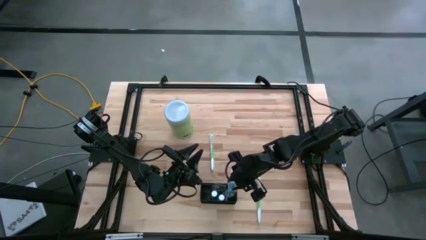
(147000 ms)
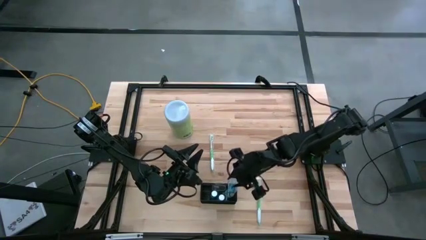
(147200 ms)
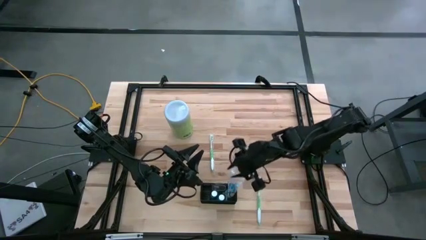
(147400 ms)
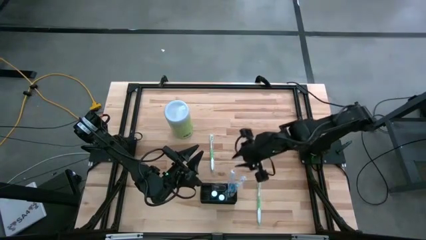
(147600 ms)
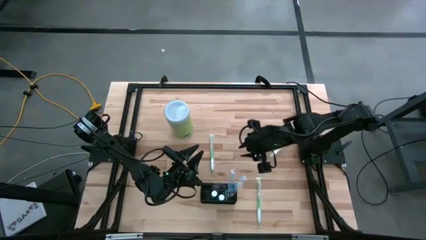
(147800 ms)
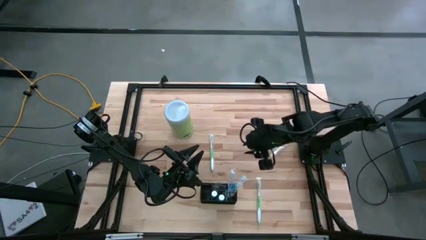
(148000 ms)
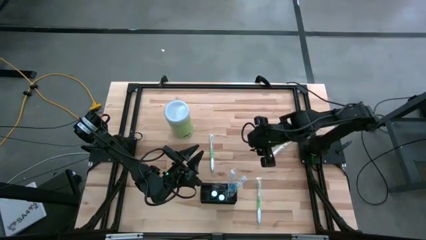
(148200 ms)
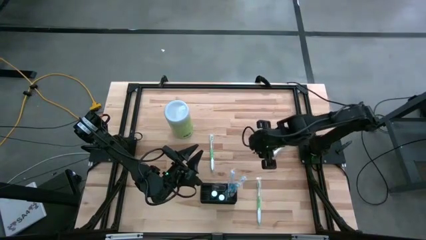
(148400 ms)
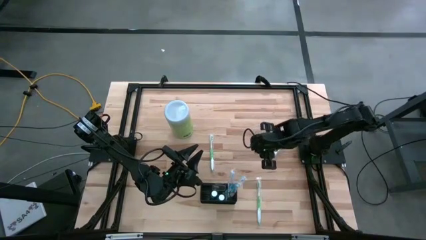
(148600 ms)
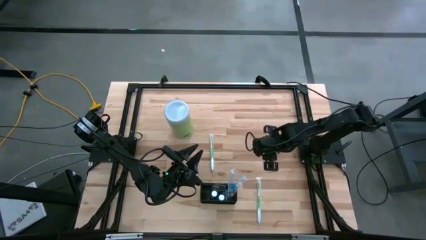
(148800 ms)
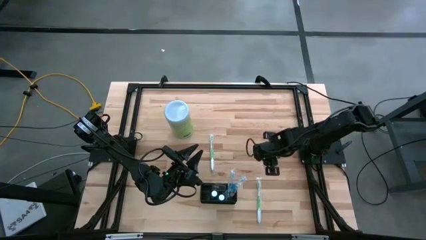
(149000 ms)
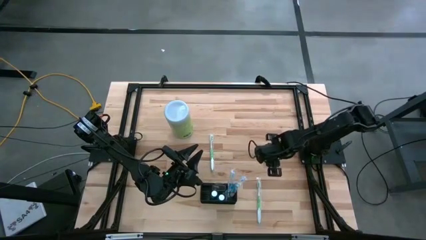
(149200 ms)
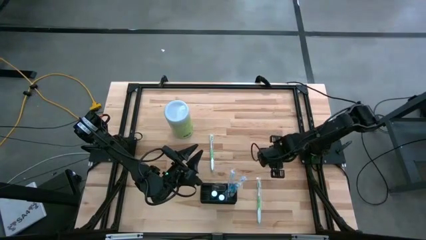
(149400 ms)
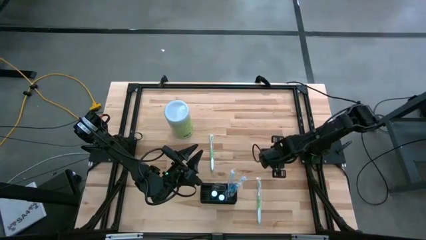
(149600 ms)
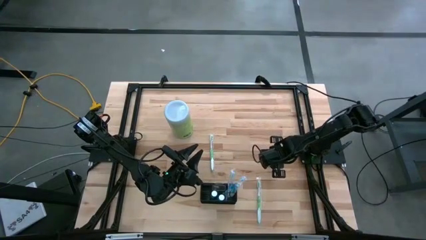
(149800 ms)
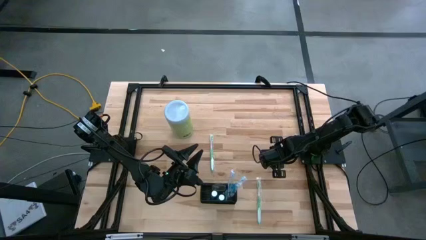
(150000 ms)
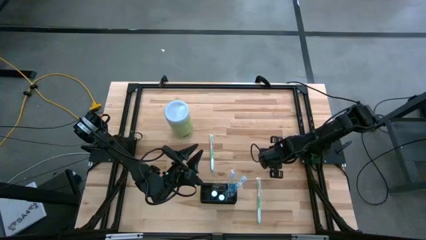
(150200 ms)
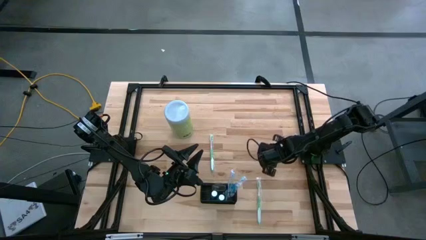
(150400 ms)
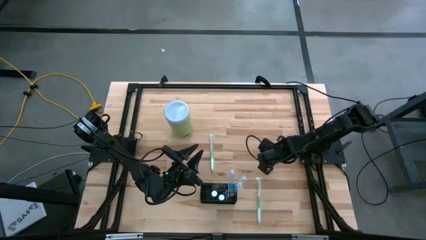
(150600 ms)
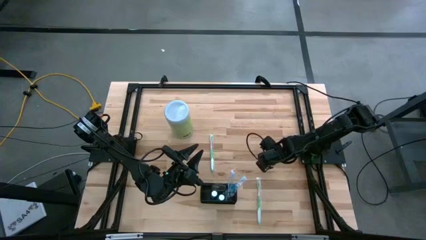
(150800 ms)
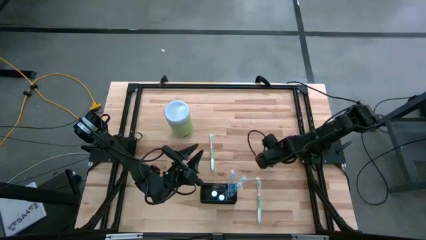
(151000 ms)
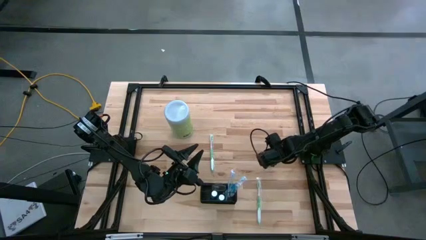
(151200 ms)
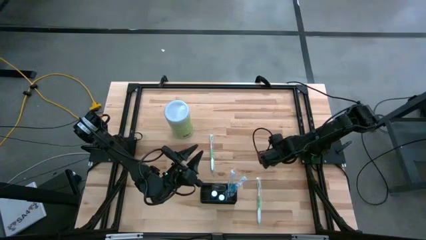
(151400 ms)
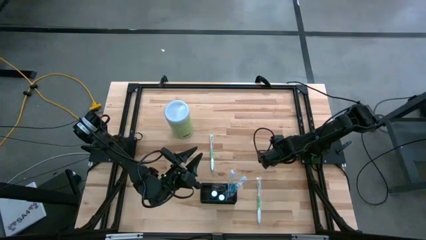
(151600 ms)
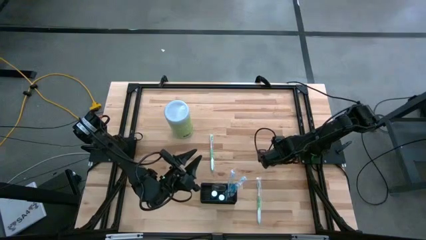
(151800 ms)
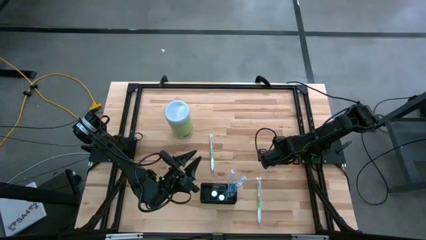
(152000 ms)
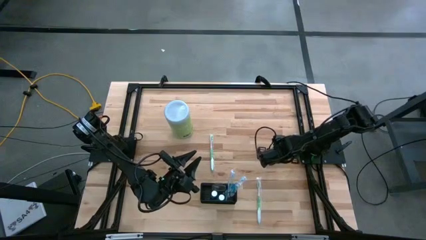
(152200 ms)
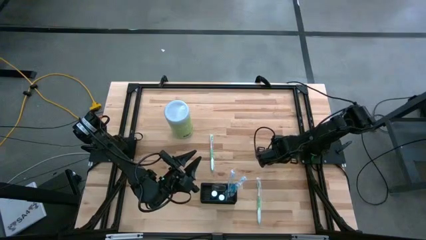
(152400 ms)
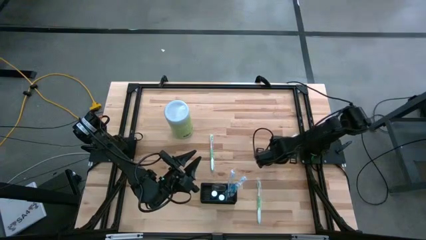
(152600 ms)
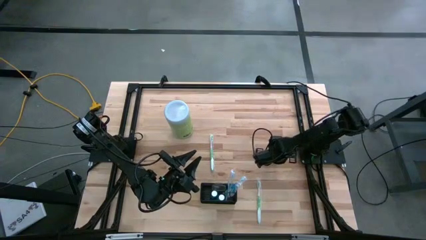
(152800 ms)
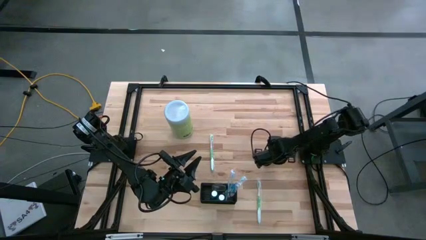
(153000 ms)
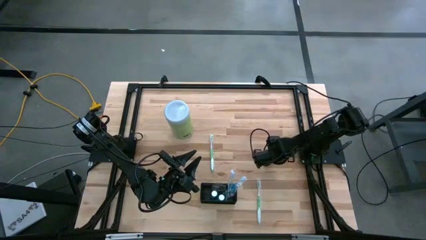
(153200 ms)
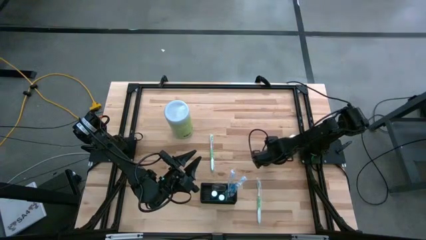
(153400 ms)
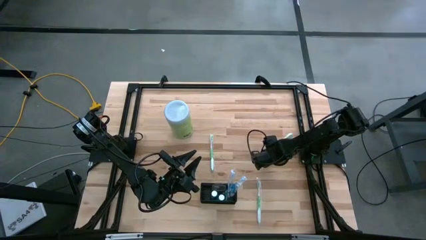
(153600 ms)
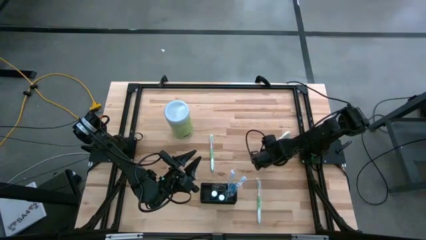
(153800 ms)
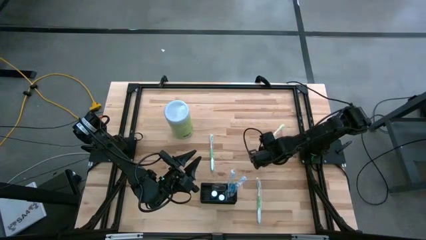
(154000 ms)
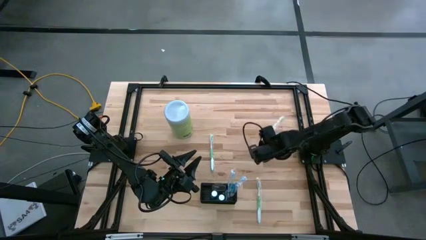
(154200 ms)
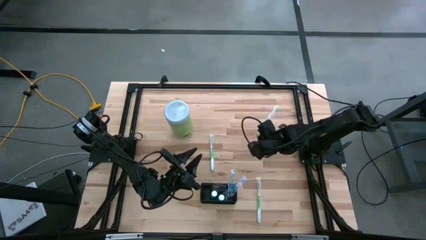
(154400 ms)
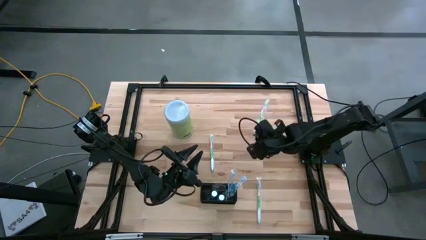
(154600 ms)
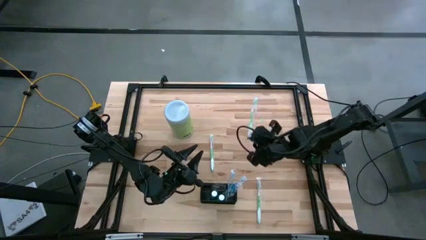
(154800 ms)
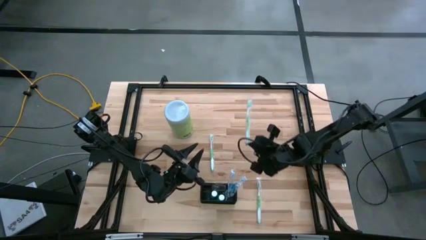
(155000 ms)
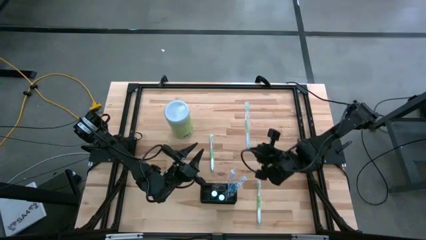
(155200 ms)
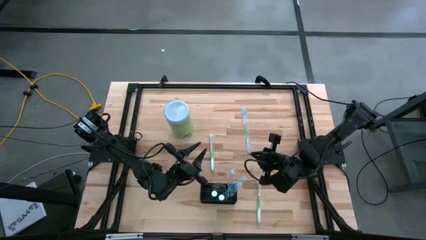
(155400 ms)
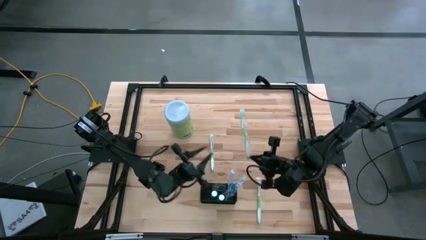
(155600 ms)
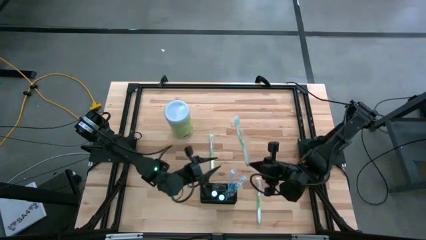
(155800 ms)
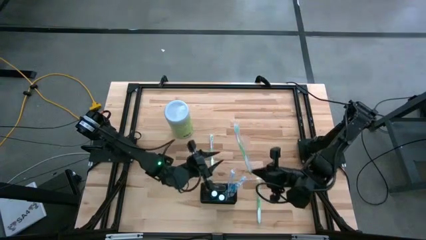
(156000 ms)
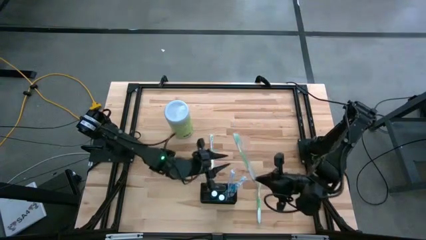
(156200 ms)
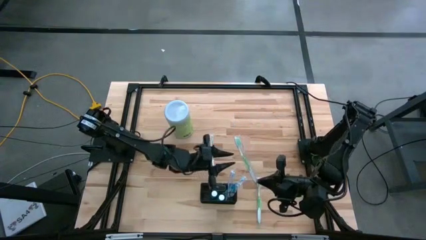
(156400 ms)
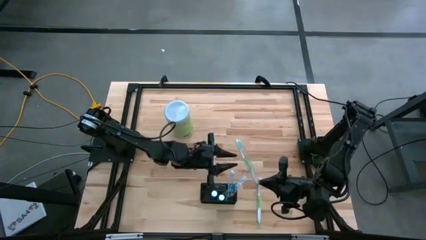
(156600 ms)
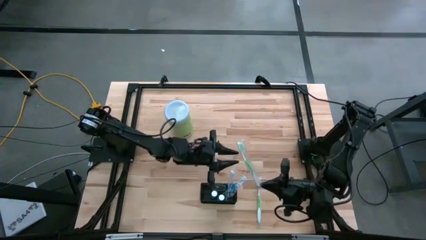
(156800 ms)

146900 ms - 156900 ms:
Task: Pick & Place toothbrushing station
Put the top right green toothbrush into the mesh organizer
